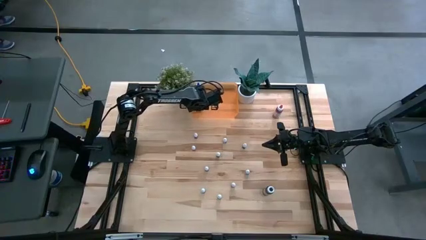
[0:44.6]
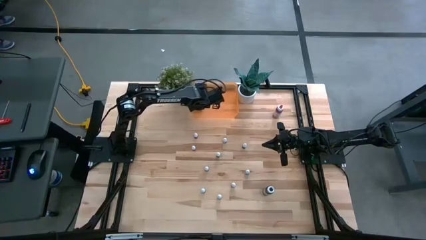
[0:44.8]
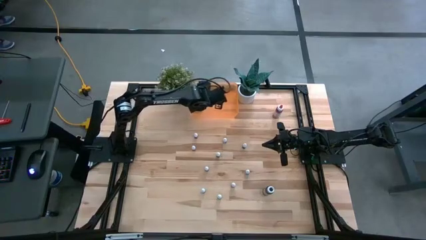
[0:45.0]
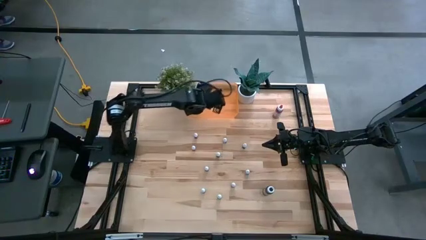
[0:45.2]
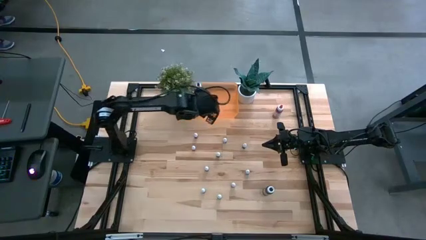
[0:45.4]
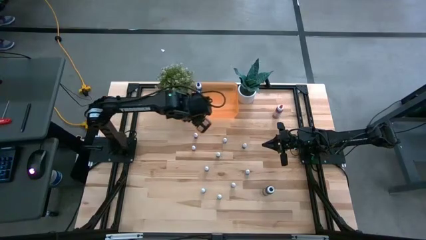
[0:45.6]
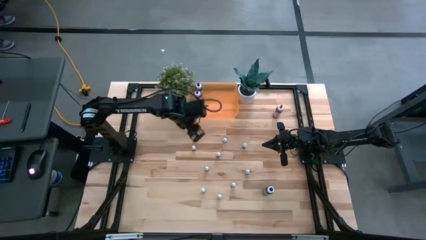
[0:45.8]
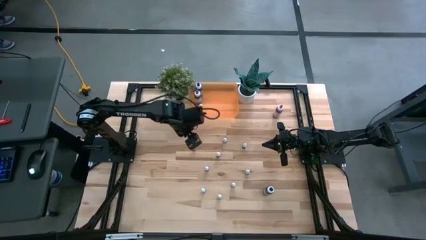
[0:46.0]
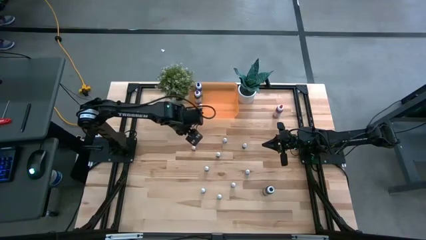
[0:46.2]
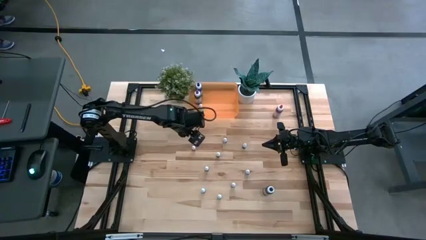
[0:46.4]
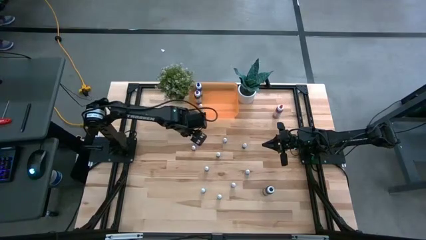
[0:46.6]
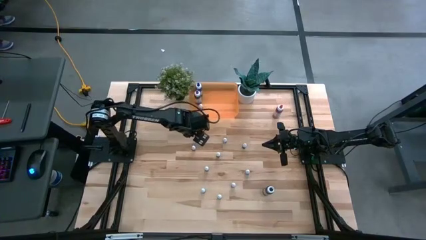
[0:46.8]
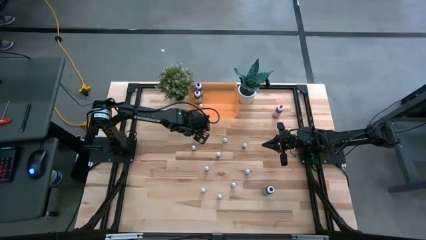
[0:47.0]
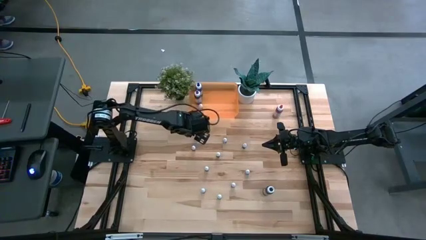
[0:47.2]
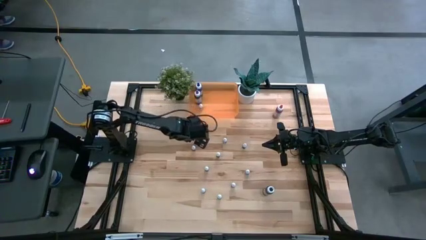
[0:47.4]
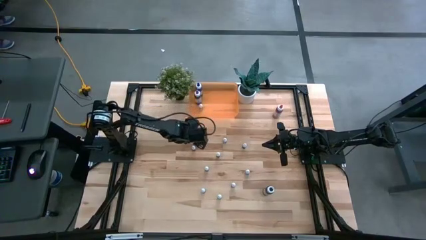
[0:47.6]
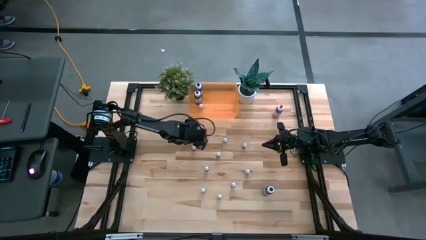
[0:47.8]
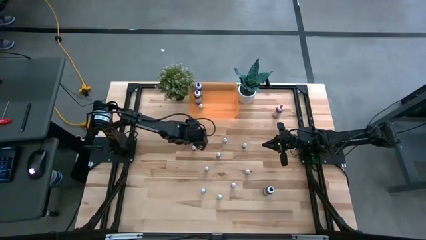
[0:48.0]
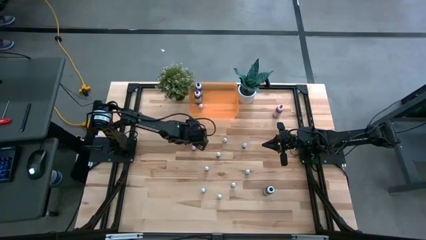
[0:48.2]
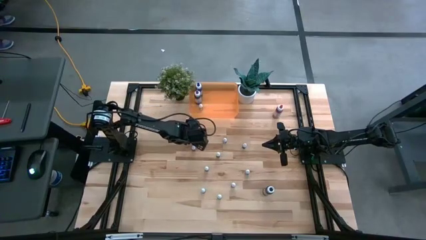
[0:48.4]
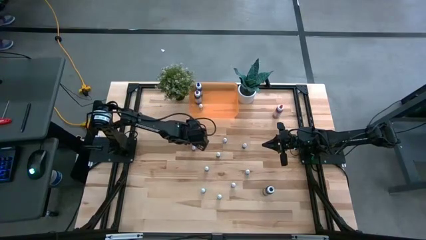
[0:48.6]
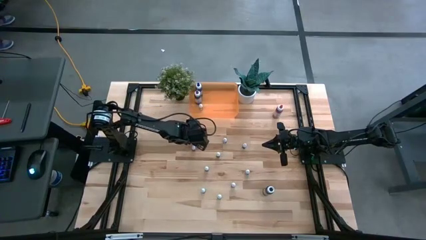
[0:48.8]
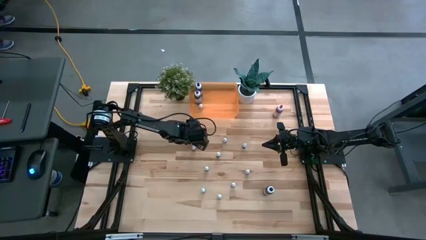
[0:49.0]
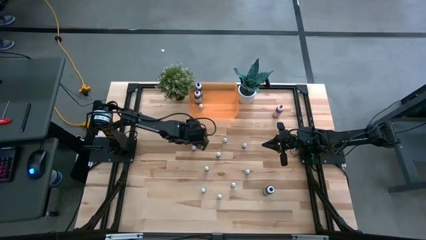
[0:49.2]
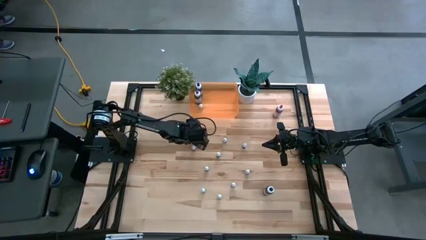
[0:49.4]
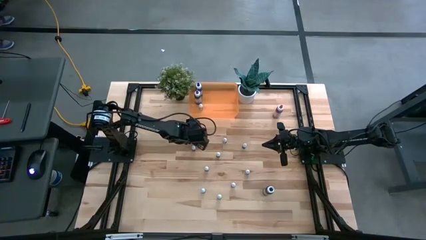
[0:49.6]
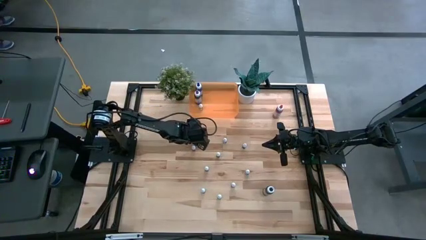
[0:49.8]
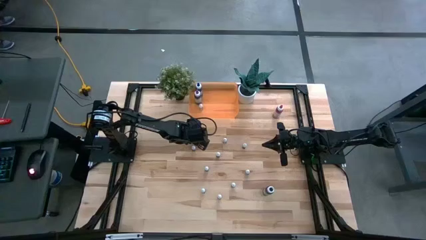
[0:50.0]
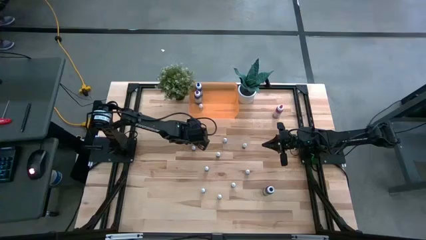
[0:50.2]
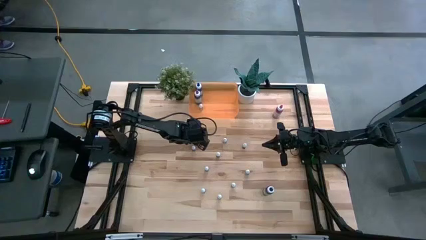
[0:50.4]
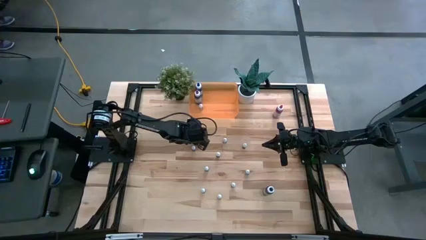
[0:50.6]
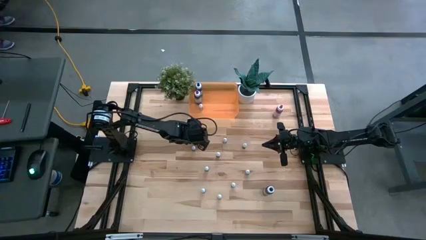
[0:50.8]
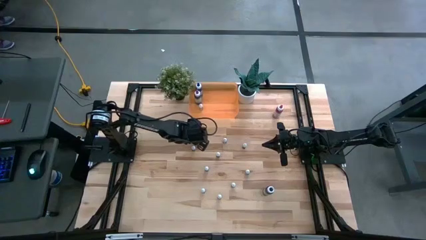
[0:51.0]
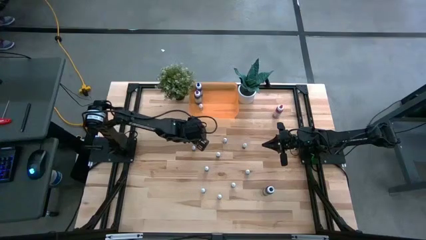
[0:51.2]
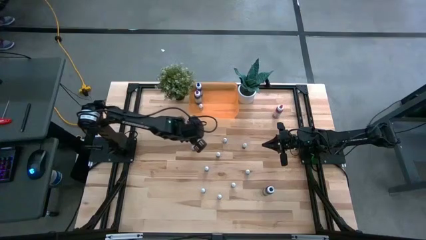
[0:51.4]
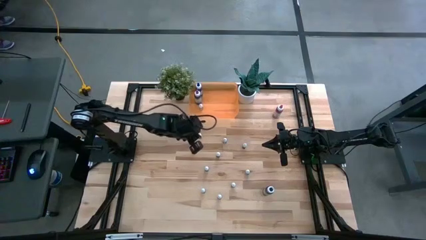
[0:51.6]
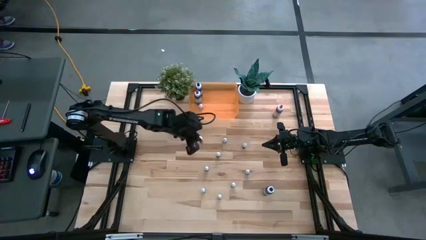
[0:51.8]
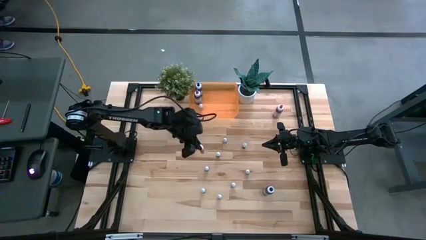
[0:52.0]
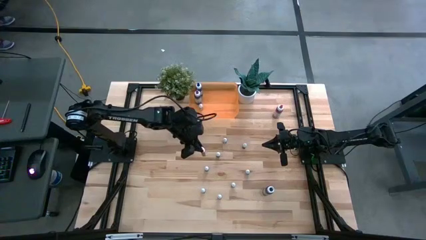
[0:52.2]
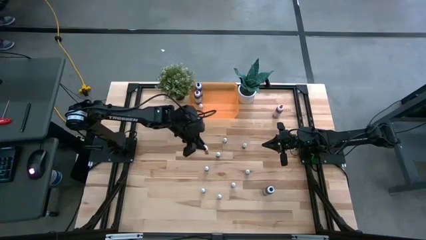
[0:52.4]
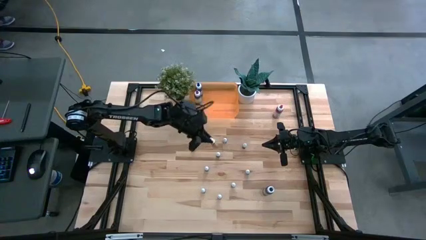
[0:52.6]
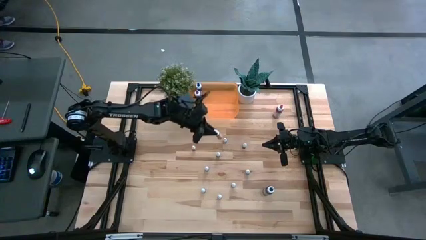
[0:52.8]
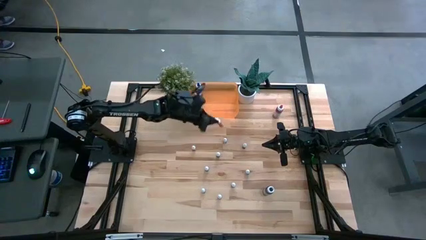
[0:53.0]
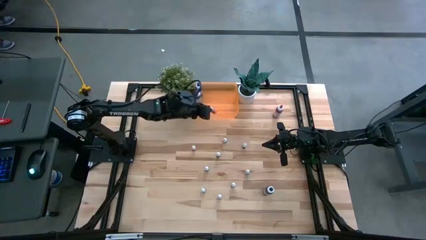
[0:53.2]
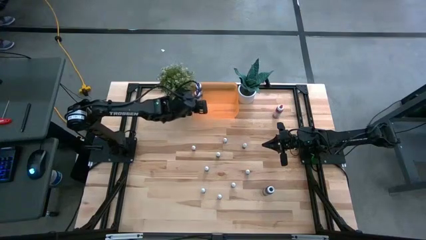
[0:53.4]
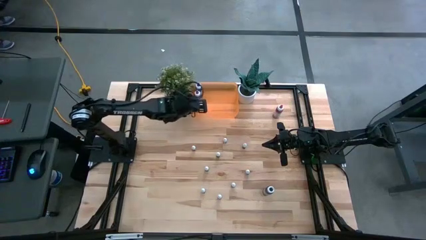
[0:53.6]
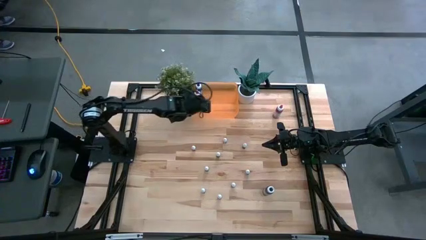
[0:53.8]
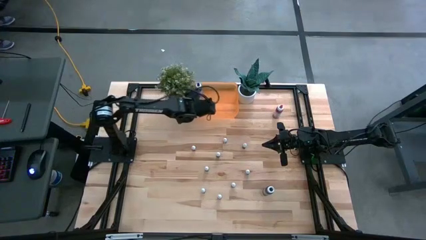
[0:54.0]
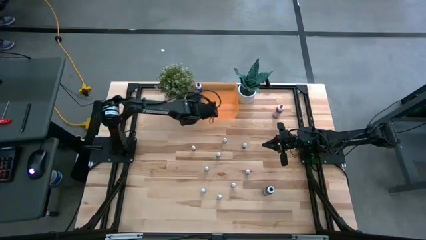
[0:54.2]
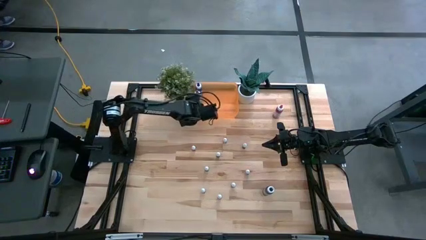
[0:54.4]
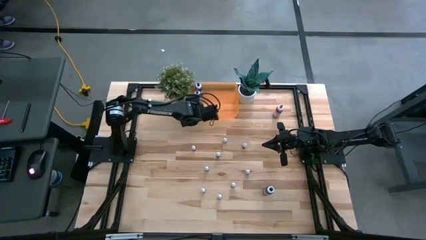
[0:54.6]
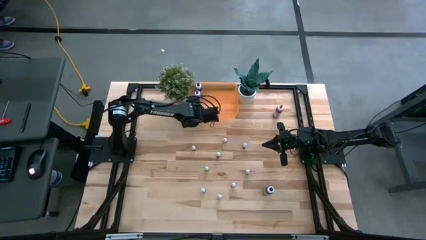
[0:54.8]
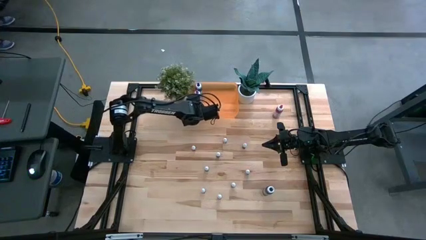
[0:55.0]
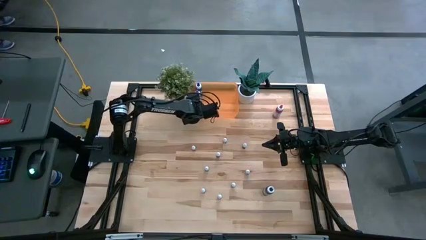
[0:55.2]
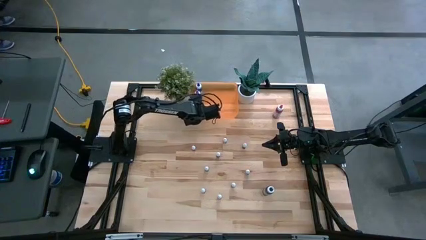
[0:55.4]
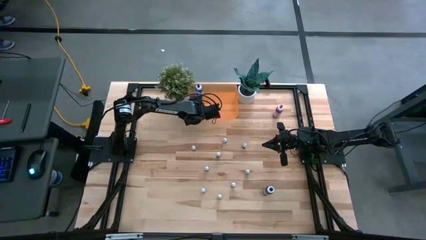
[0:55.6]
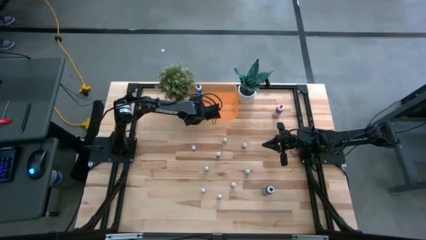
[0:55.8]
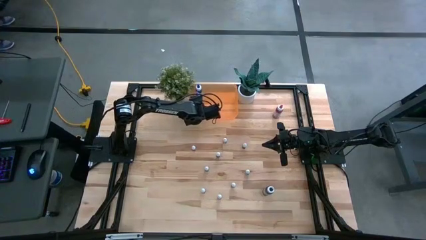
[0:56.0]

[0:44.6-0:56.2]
Task: Pick & Place food coloring
Put the small orange bottle into the bin

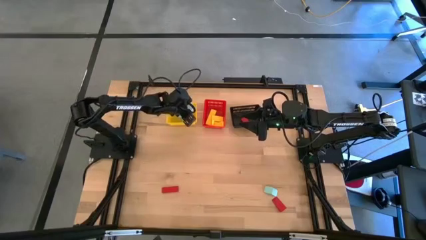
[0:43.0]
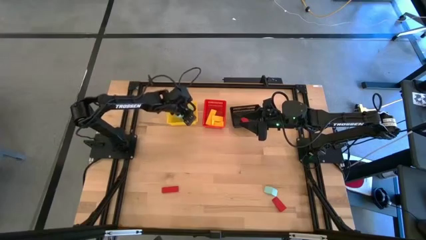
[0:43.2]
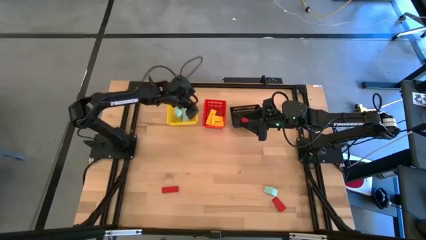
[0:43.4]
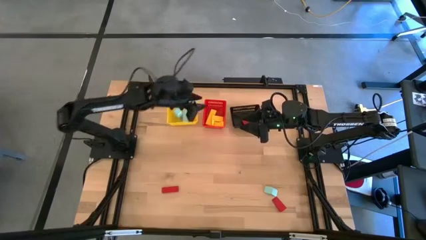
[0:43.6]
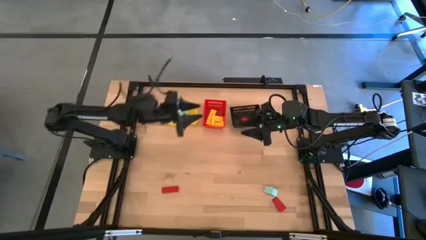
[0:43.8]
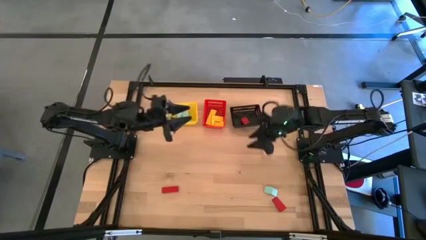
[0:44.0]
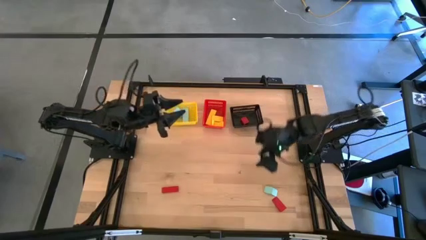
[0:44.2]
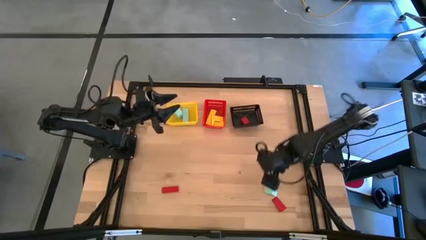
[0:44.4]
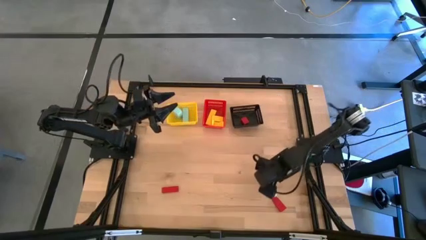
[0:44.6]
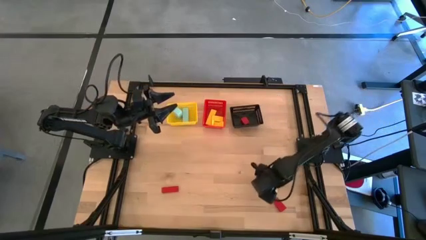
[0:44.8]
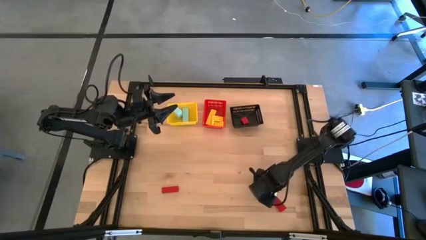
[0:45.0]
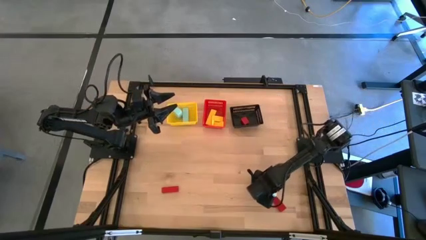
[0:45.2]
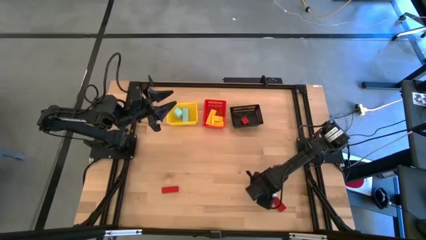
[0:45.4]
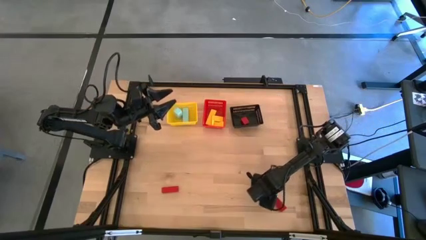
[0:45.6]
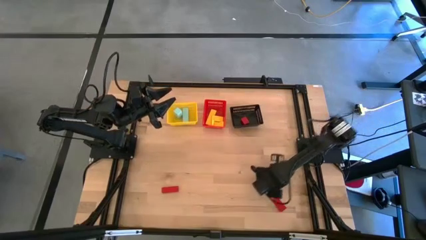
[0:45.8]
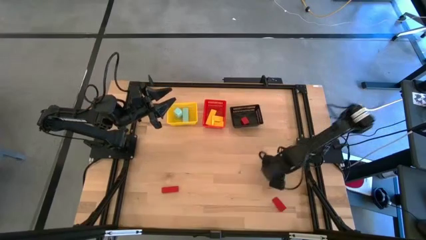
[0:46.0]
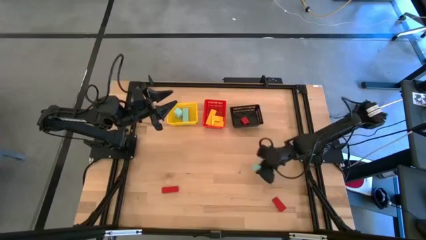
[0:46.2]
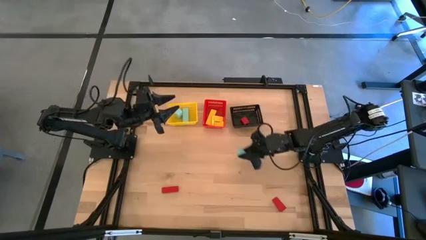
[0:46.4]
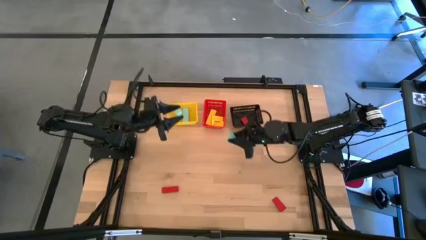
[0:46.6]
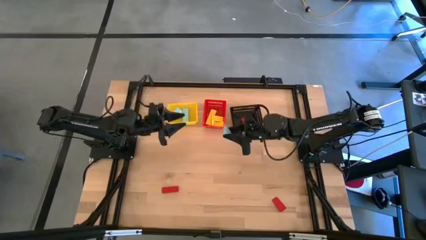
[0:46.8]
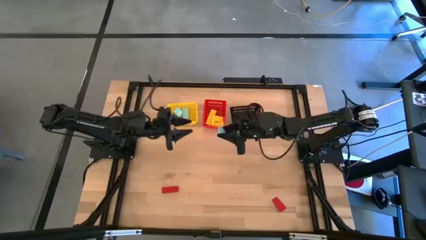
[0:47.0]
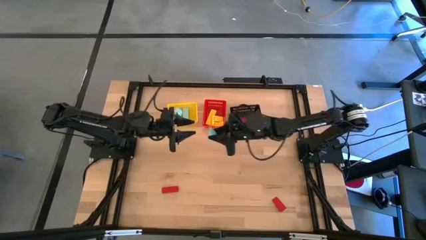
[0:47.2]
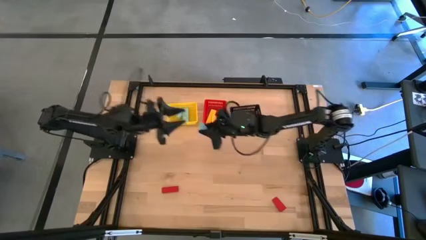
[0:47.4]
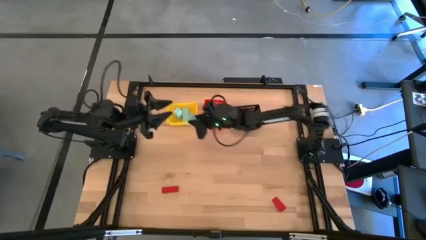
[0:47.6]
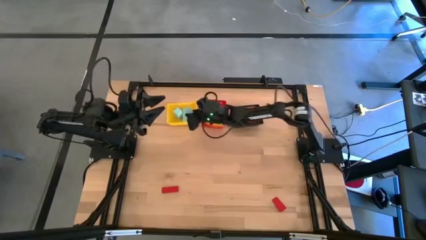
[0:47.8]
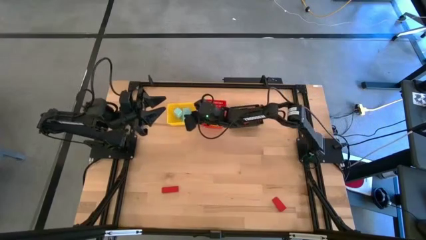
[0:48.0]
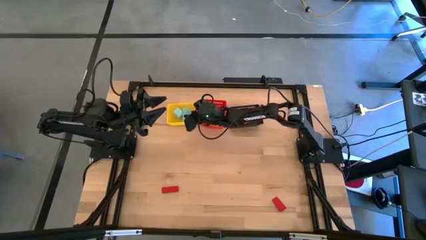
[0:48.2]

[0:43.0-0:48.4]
Task: Sort & place blocks by color
Put the light blue block into the yellow basket
